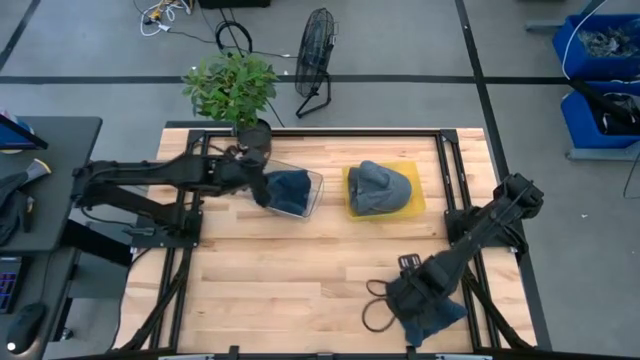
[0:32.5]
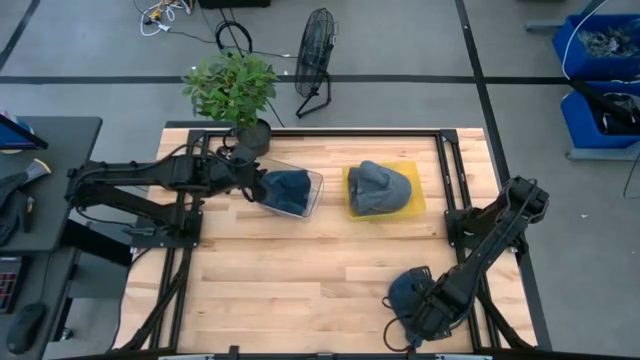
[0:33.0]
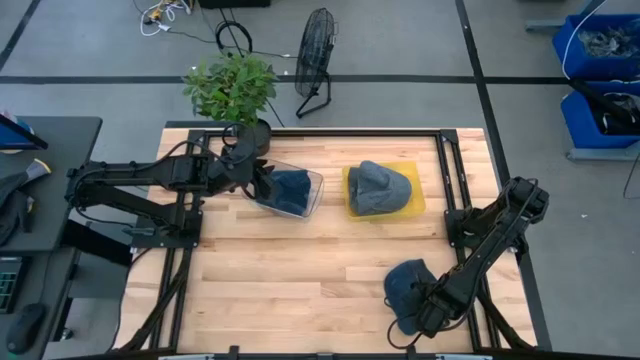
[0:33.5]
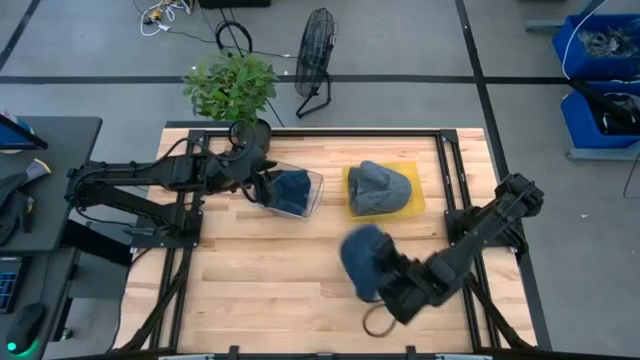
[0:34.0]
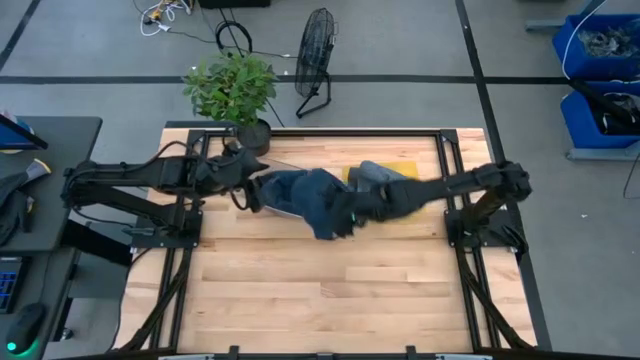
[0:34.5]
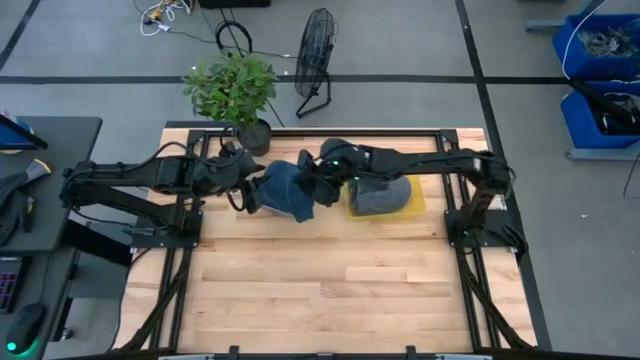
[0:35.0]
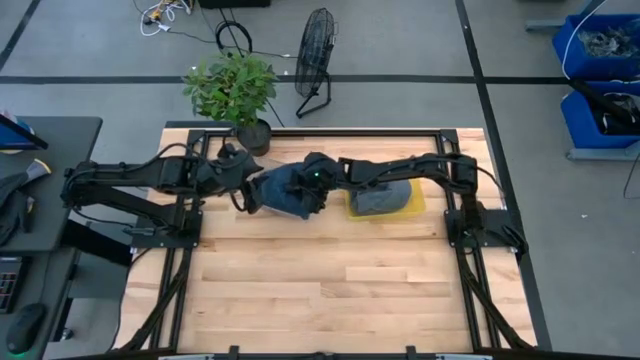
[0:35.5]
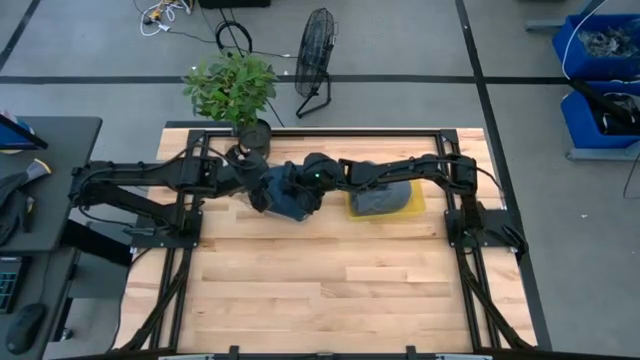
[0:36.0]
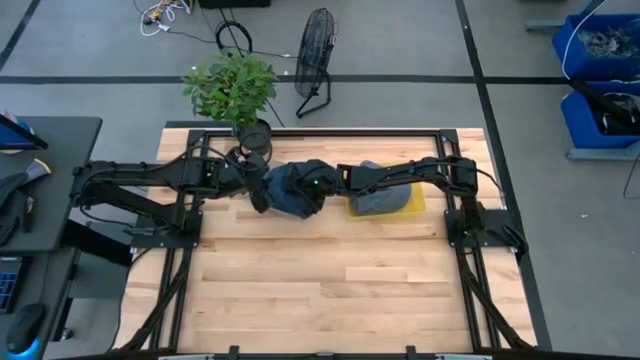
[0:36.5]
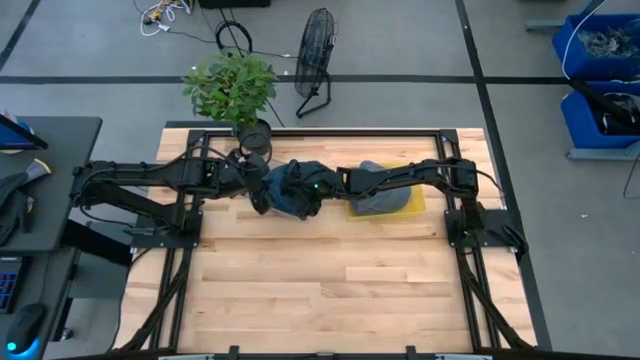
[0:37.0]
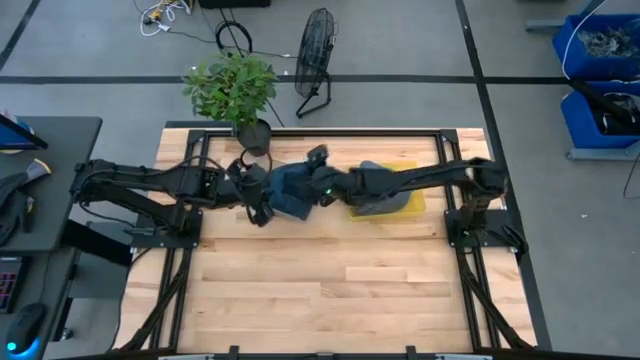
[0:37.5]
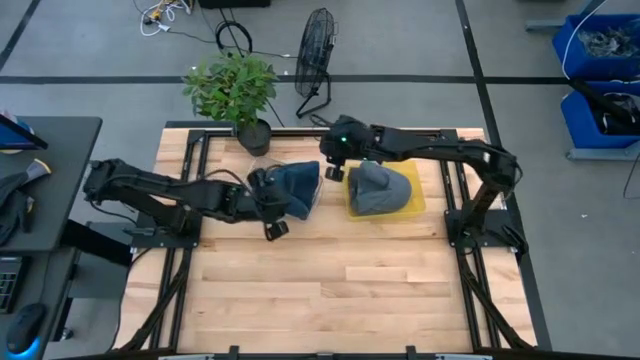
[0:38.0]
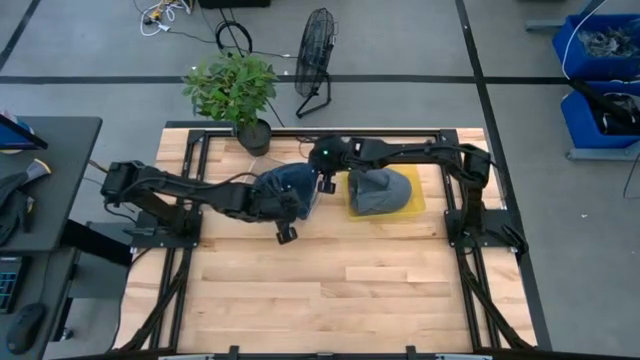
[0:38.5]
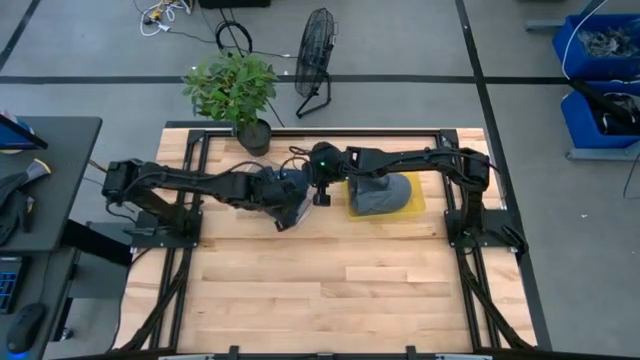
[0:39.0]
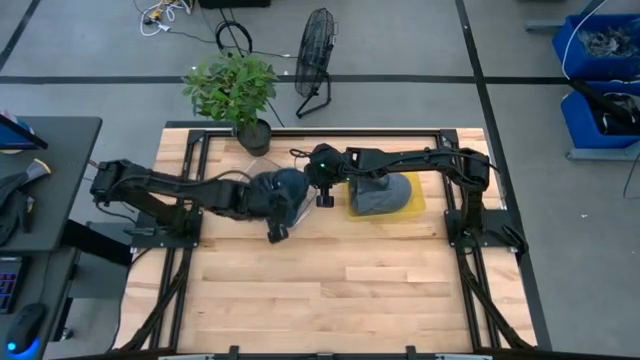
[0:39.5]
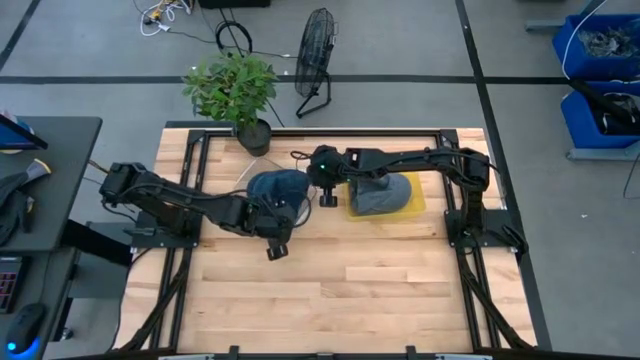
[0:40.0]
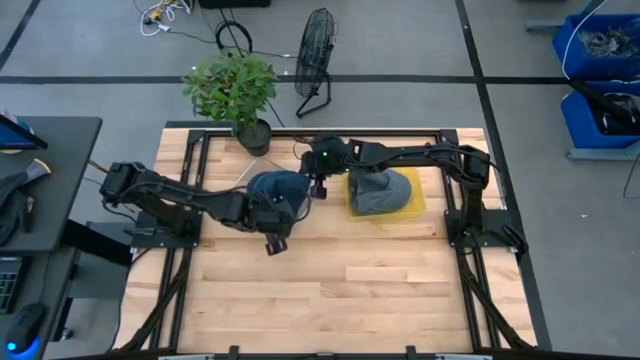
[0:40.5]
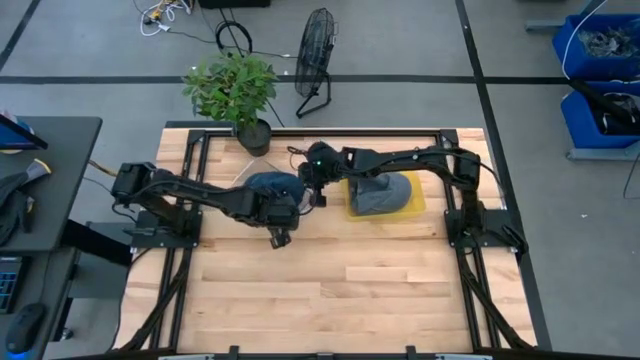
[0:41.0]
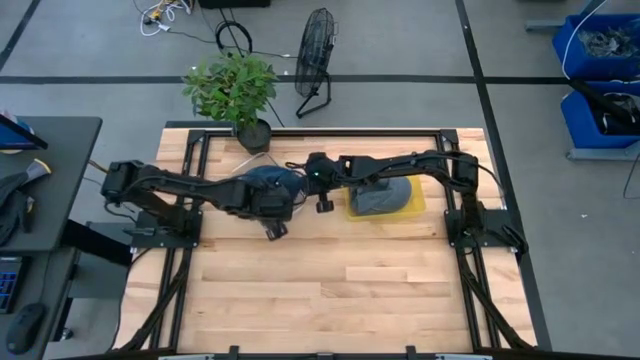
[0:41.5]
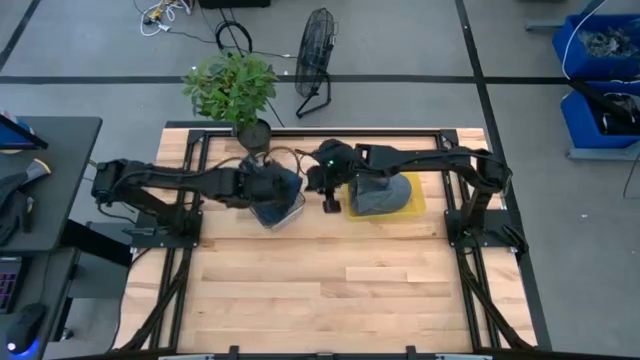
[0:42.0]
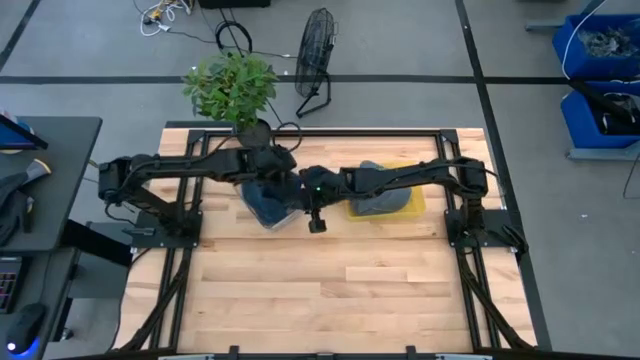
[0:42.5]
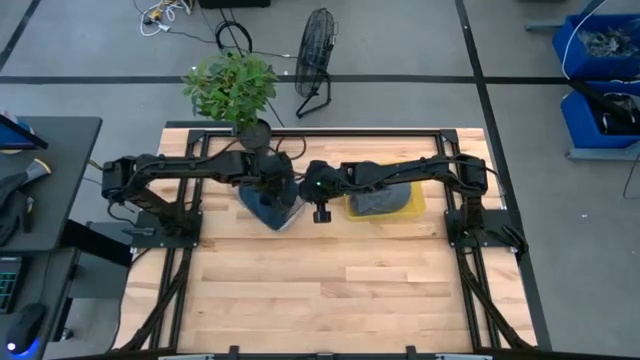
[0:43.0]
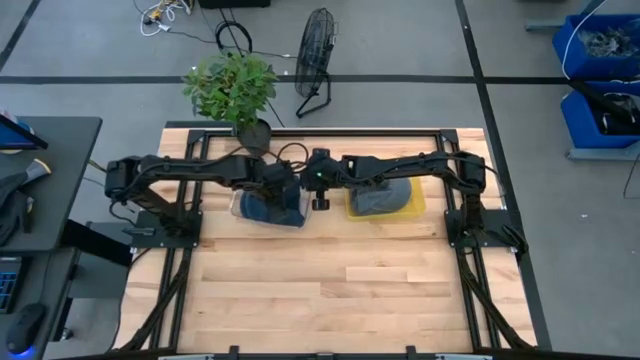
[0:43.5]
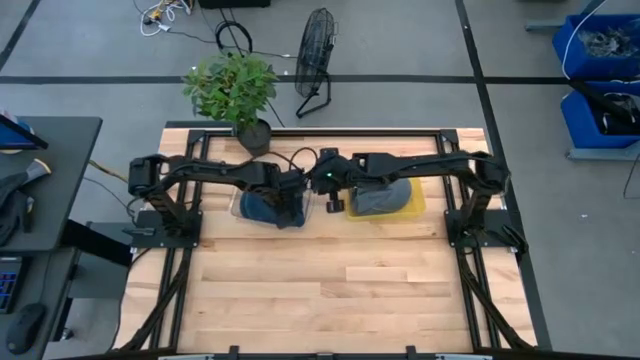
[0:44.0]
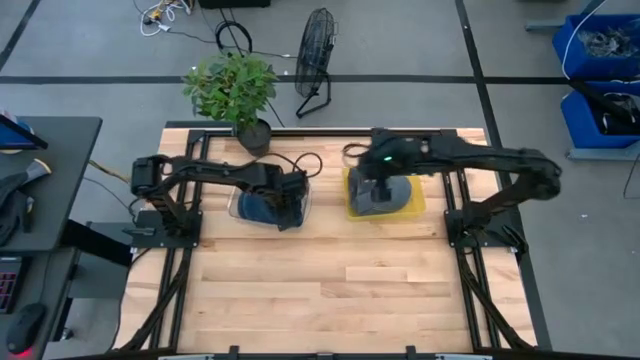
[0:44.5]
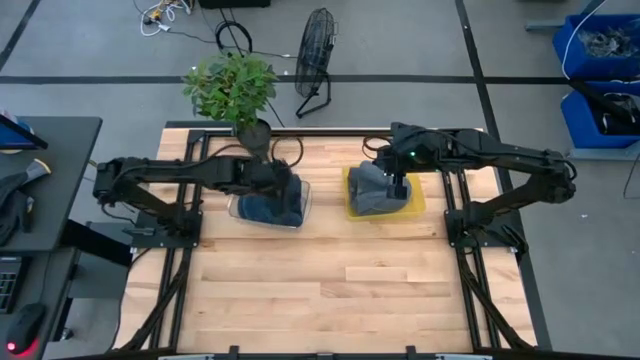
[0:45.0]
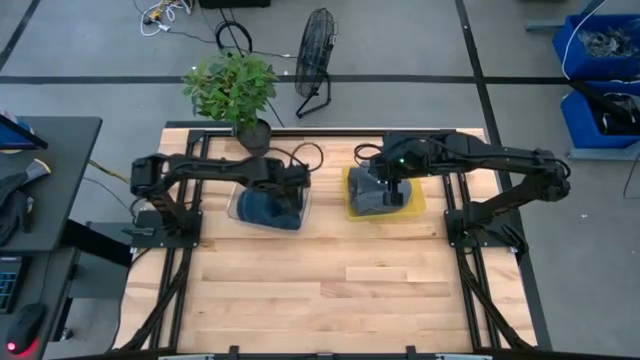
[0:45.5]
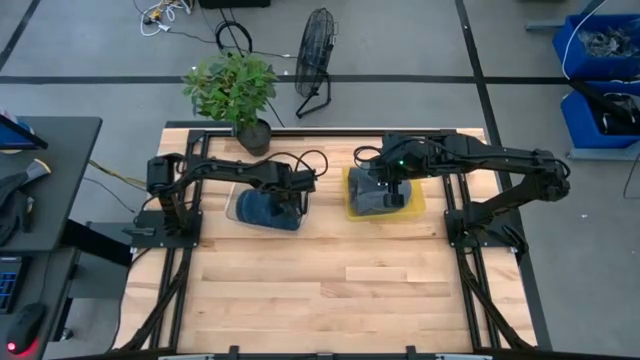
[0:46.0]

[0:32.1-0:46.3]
Task: Pick & Place hat
Put the blue cap into the transparent bin

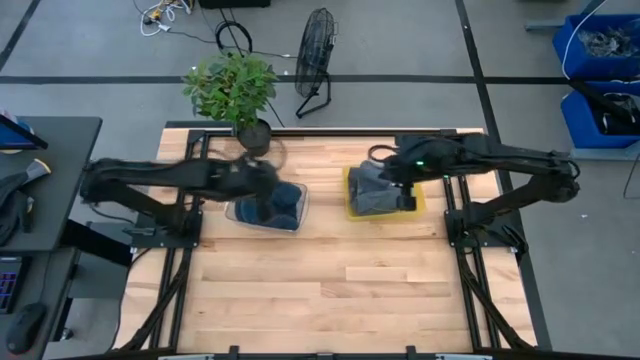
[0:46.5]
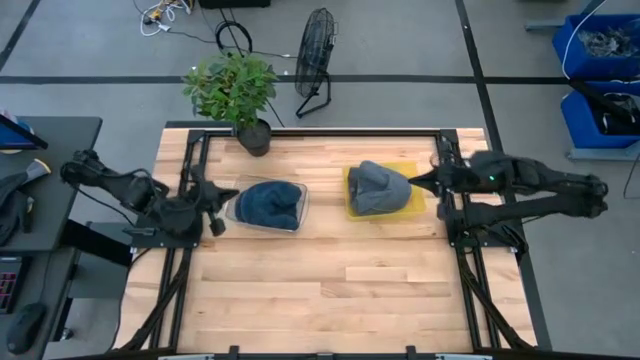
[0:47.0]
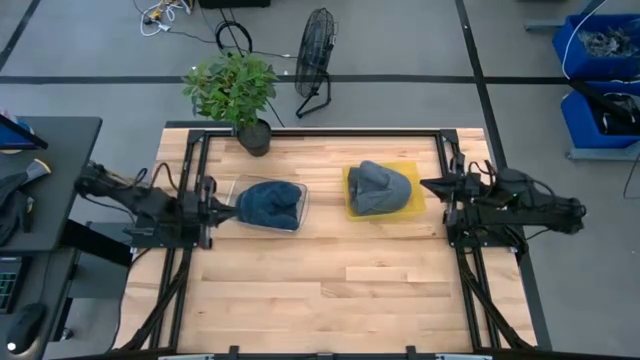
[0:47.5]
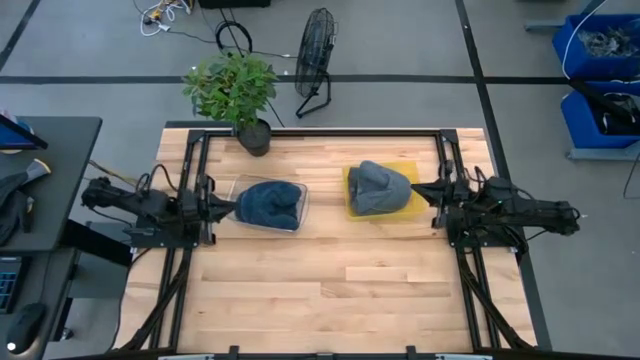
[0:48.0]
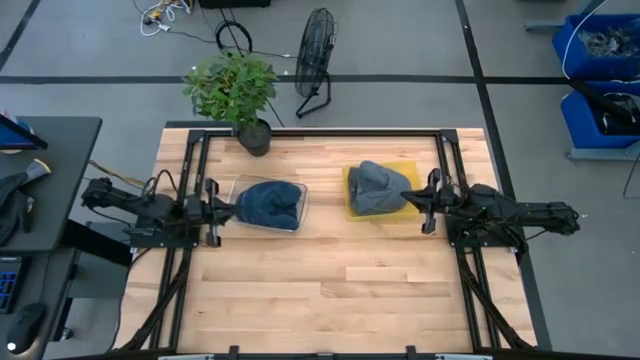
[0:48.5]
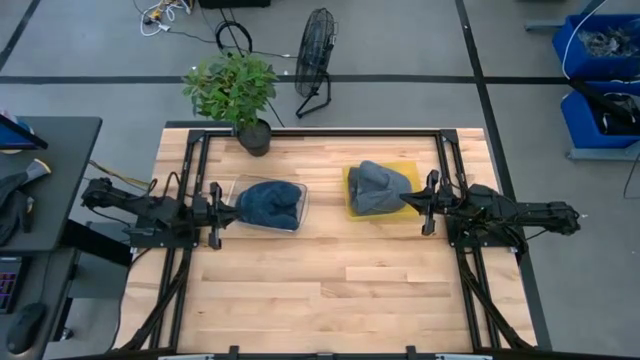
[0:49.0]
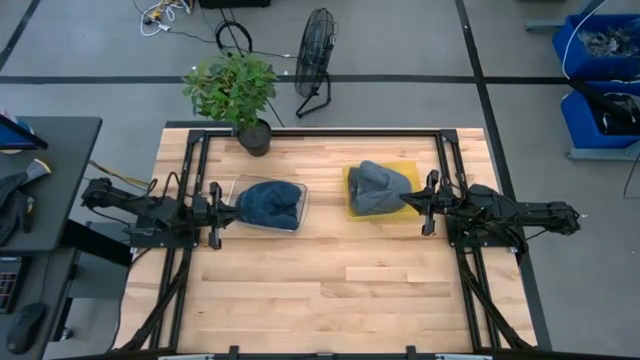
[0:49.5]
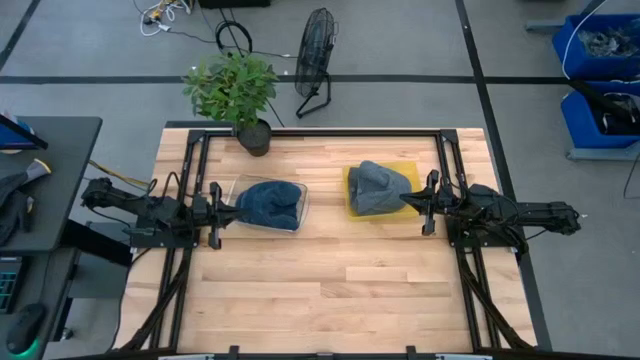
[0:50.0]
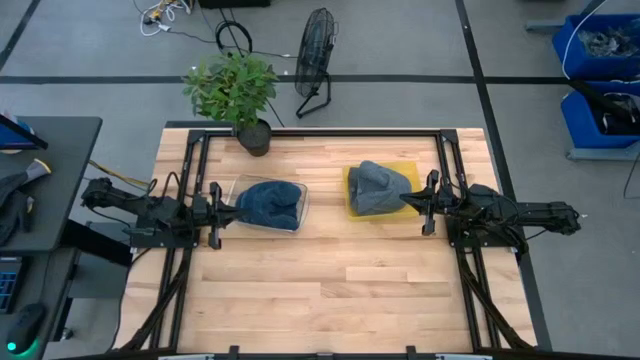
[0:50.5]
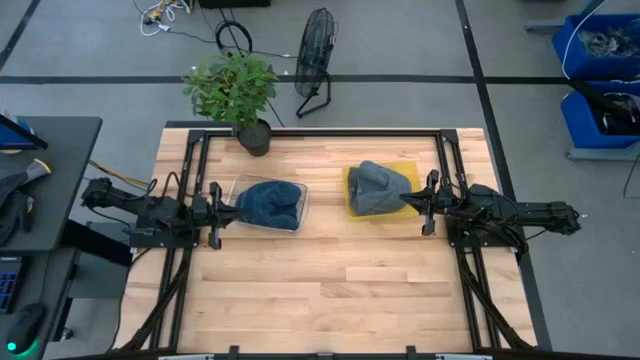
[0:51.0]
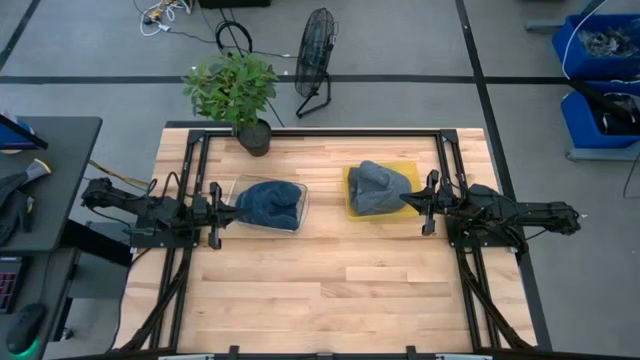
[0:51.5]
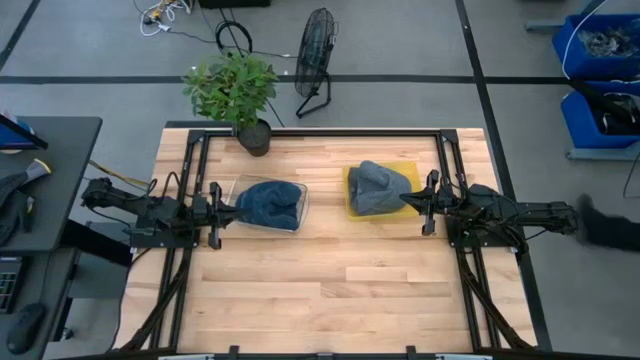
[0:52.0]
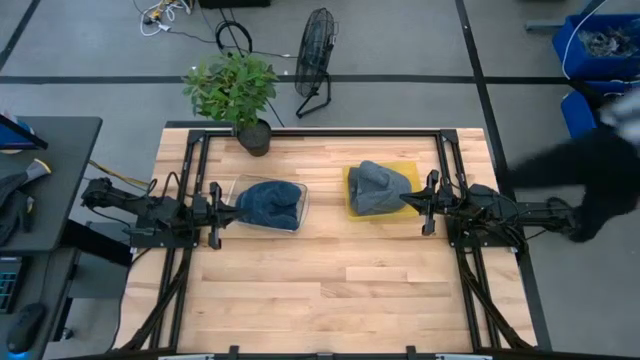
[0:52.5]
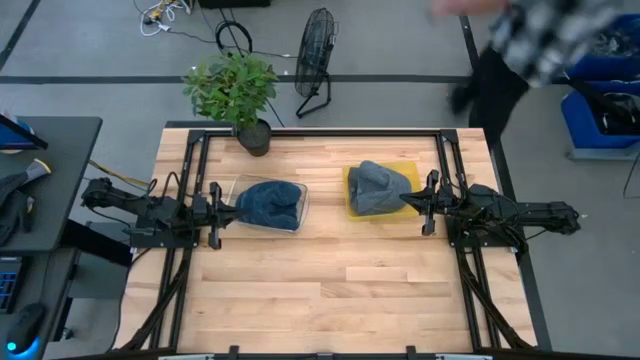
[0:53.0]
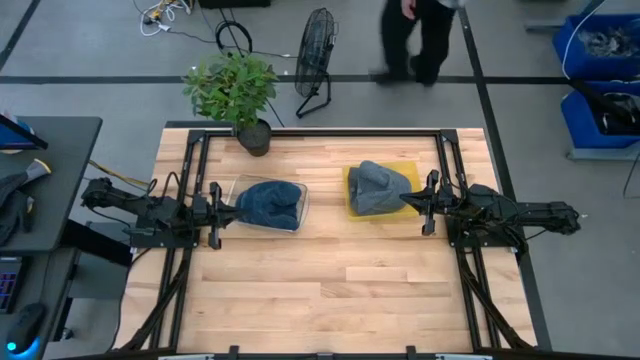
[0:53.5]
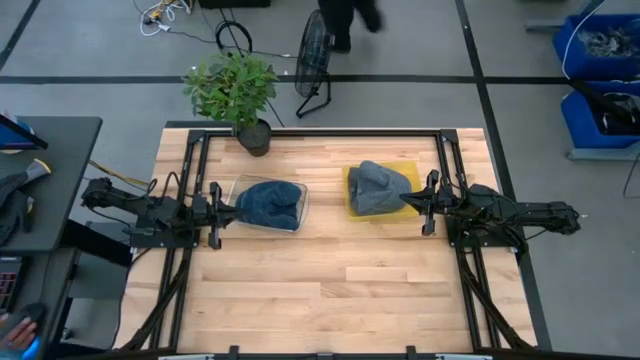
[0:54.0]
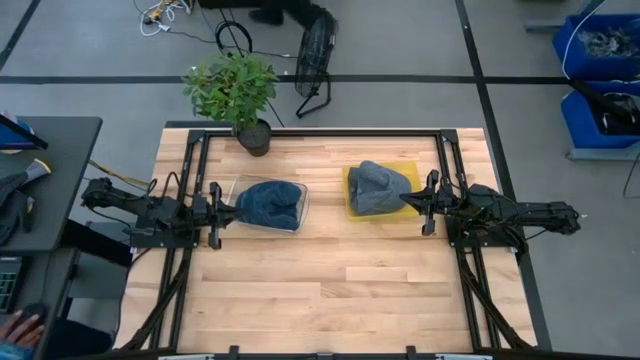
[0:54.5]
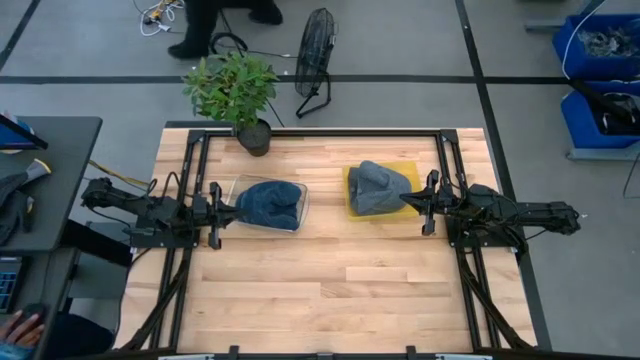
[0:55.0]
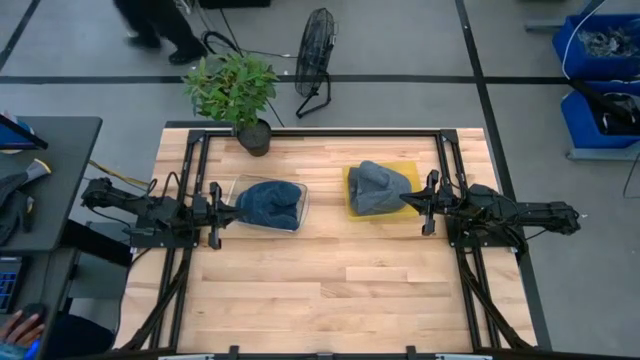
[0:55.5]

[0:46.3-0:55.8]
Return to Home Position
